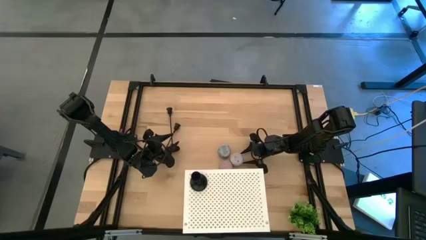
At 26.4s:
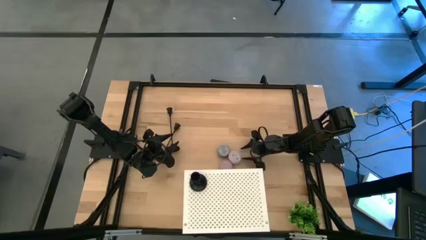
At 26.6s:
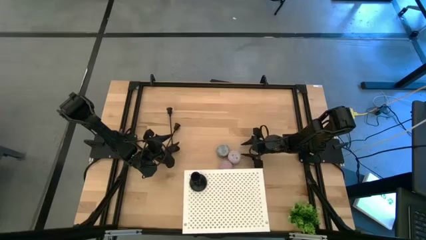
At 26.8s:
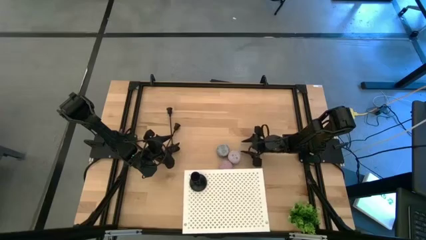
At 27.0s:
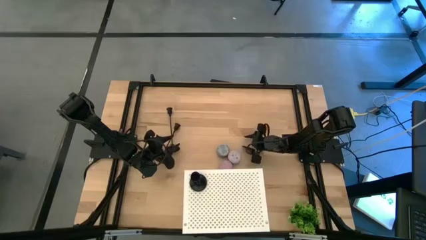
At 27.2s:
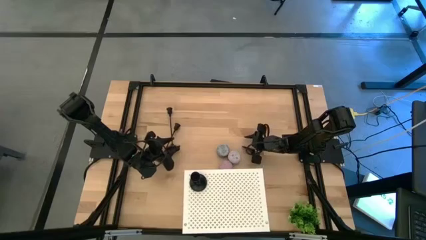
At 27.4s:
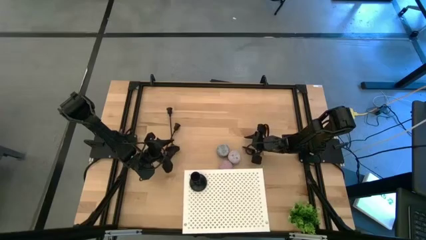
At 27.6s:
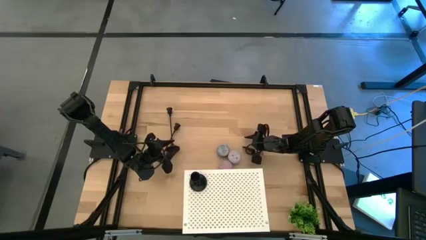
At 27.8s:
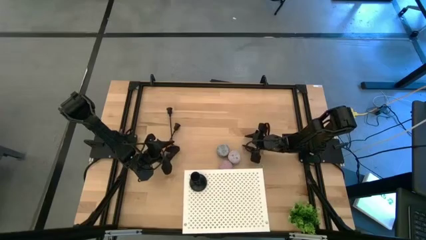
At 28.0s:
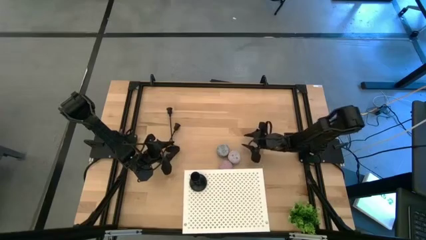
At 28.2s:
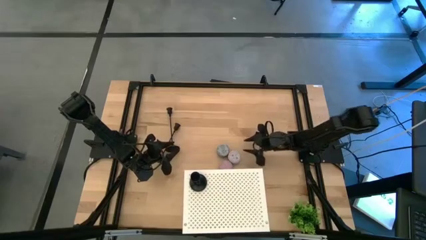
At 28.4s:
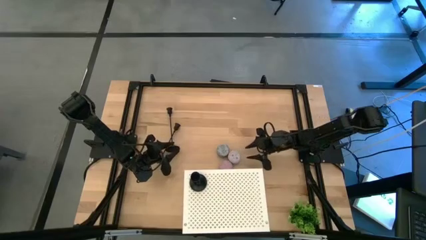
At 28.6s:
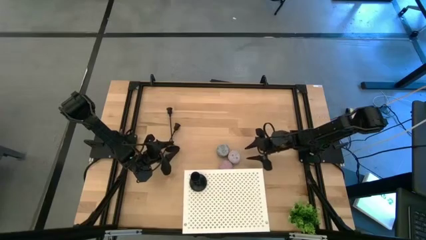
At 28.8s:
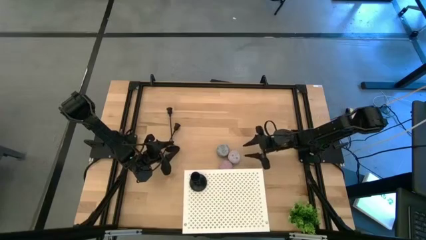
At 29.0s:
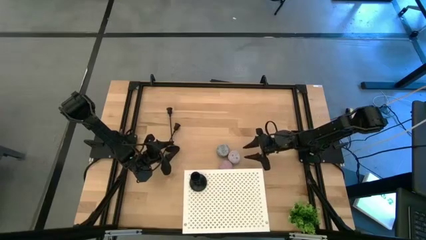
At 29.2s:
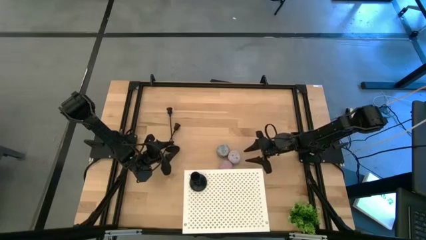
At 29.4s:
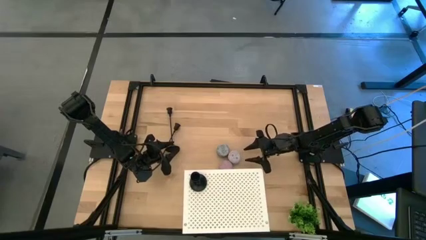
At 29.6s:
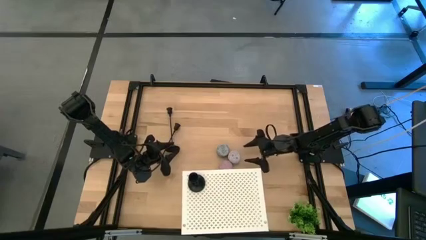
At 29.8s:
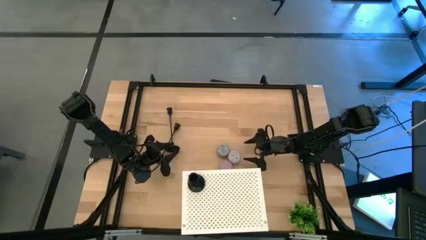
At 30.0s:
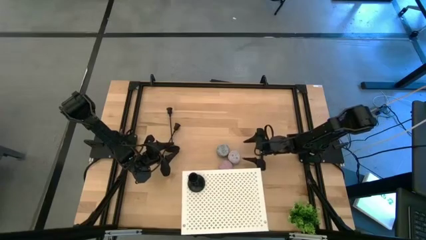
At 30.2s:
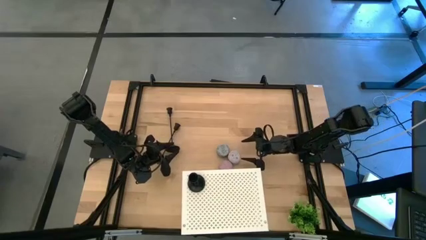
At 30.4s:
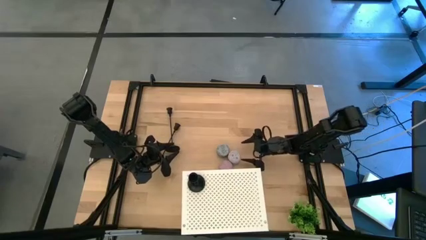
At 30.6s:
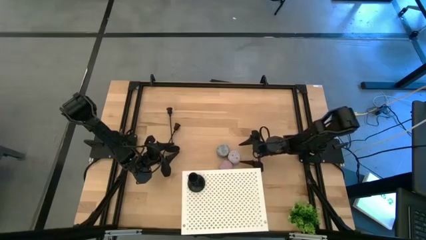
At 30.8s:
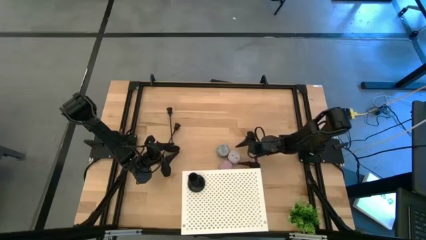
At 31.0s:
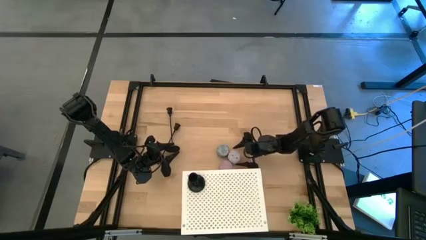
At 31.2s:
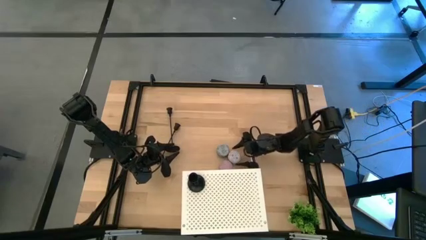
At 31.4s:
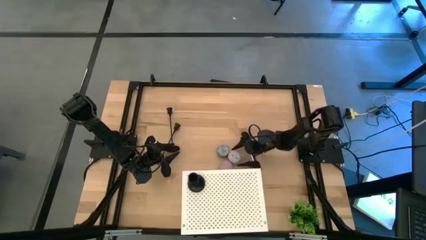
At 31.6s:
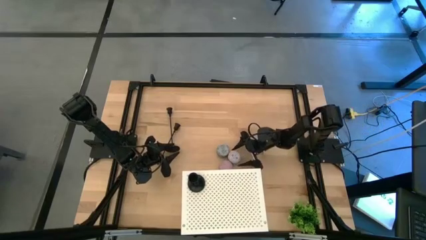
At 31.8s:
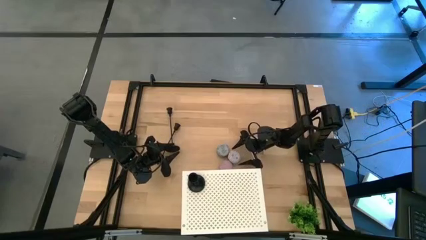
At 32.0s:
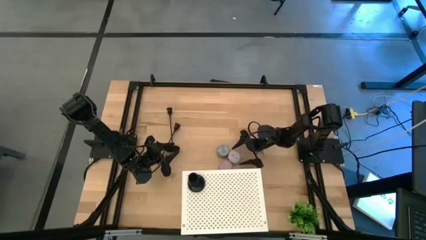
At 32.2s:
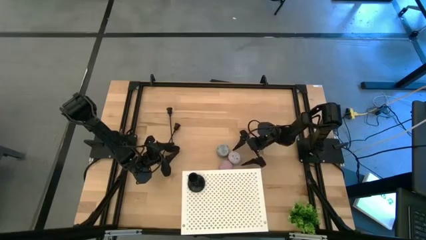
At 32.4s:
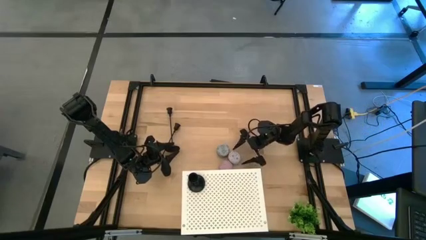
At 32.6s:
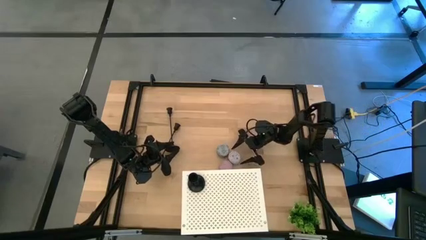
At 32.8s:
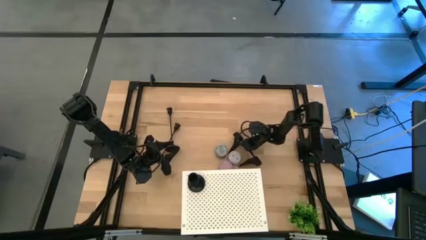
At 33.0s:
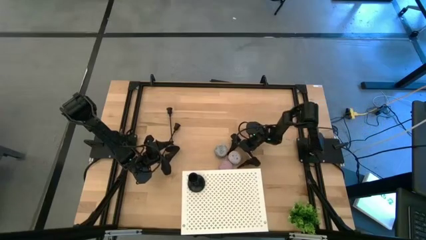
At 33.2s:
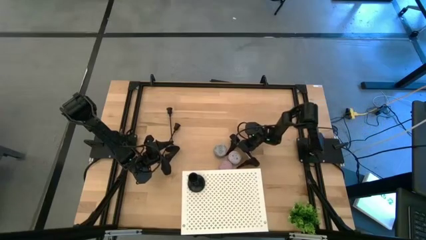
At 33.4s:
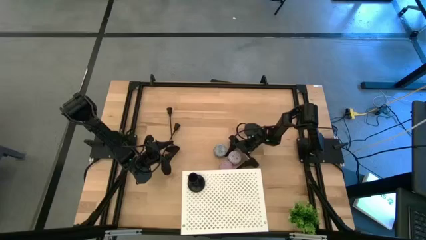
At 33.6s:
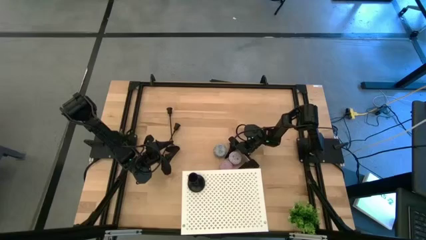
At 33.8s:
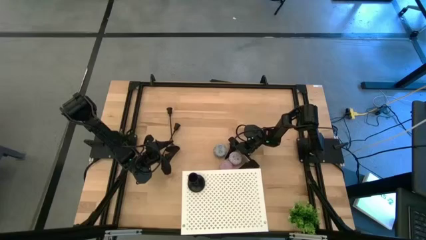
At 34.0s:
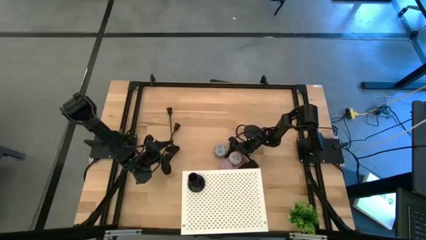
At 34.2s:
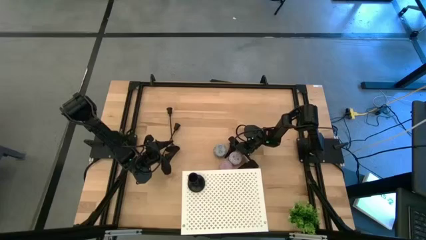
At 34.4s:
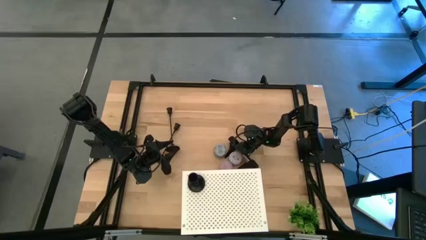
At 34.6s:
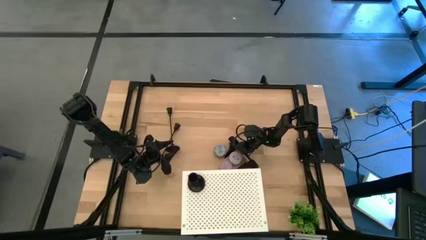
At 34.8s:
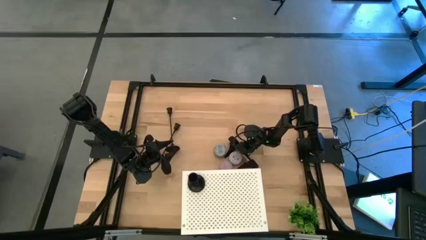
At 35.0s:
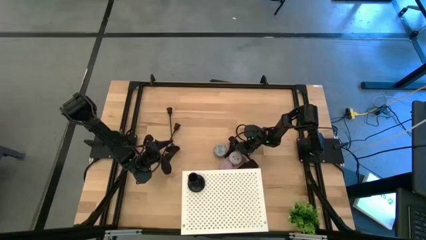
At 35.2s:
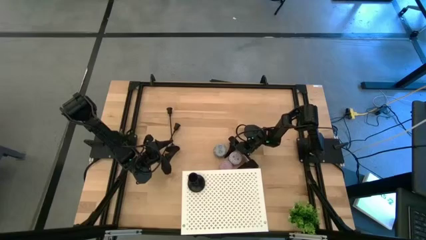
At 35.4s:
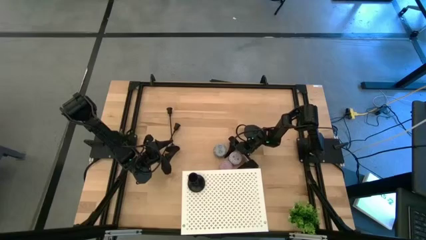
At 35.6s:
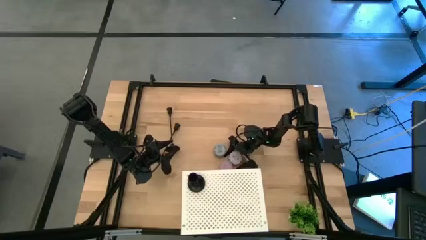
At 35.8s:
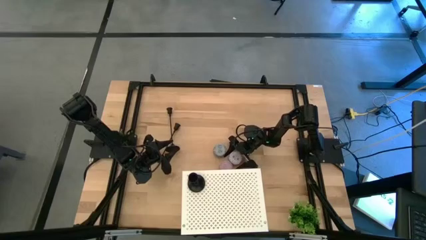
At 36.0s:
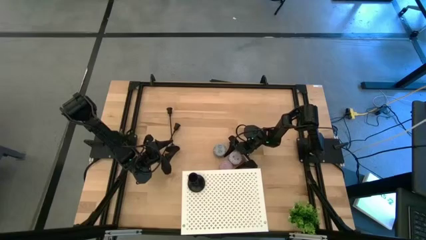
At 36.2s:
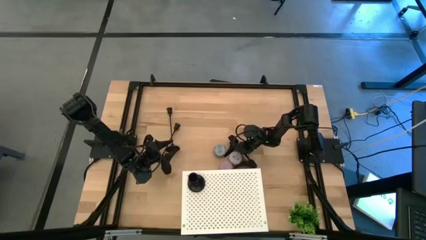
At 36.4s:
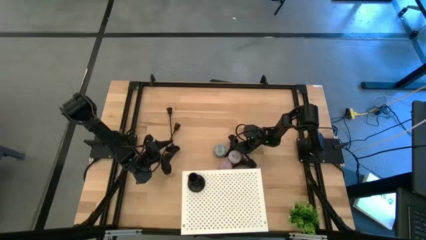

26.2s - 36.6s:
Task: Pick & Place candle stick holders
Put the right scented candle on the shelf
